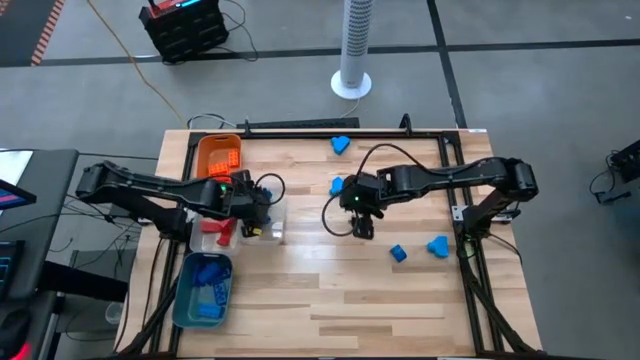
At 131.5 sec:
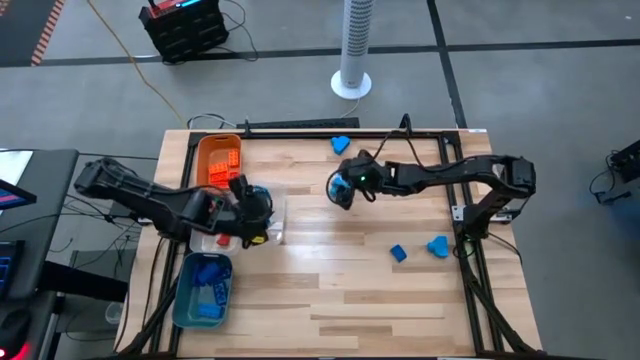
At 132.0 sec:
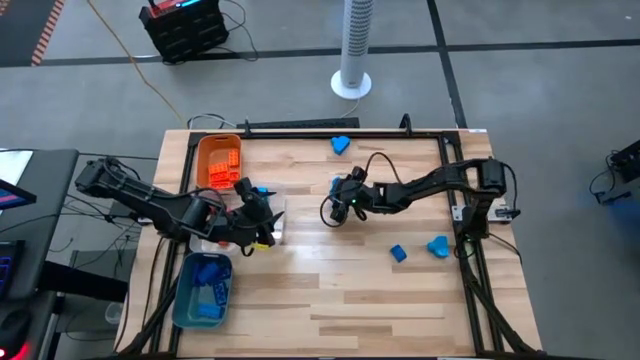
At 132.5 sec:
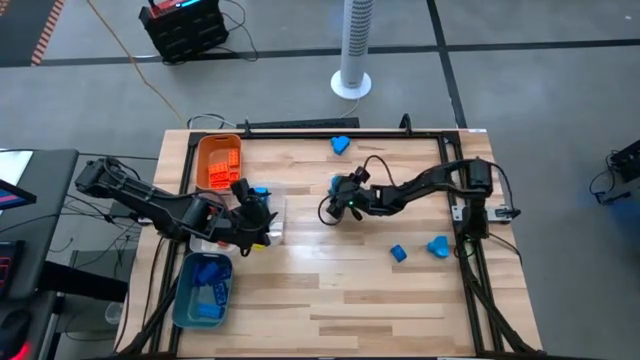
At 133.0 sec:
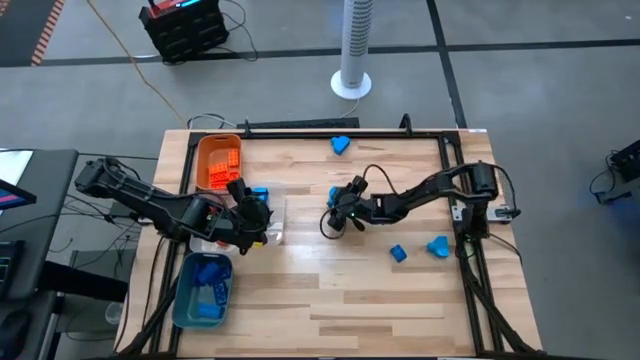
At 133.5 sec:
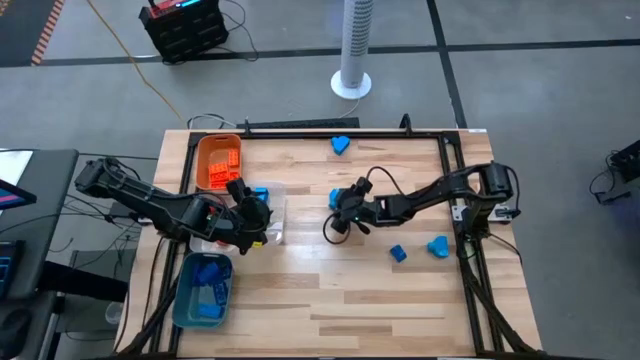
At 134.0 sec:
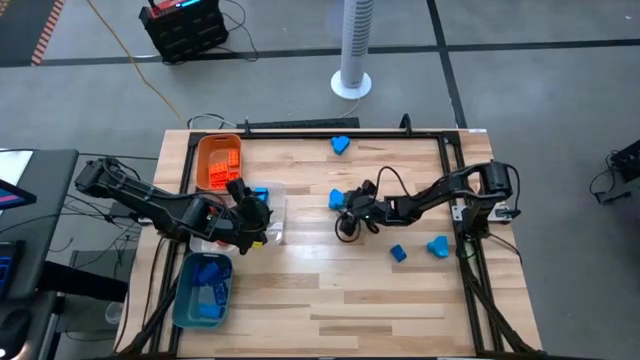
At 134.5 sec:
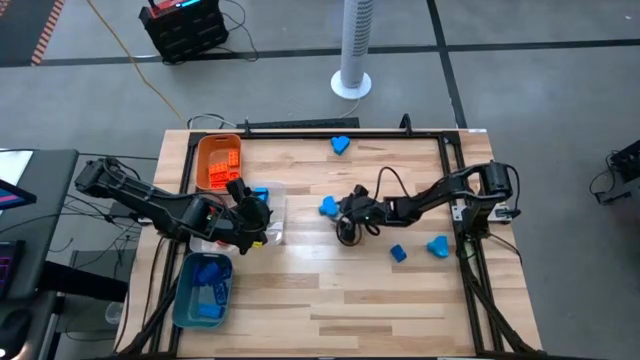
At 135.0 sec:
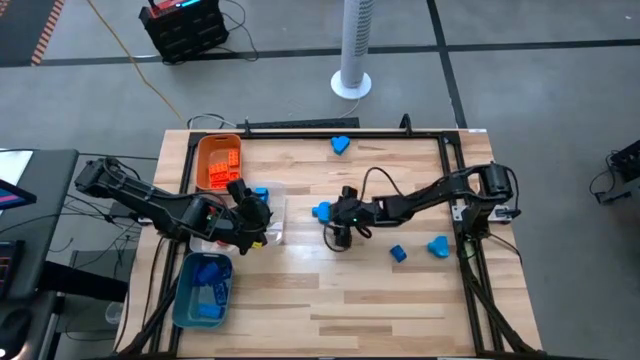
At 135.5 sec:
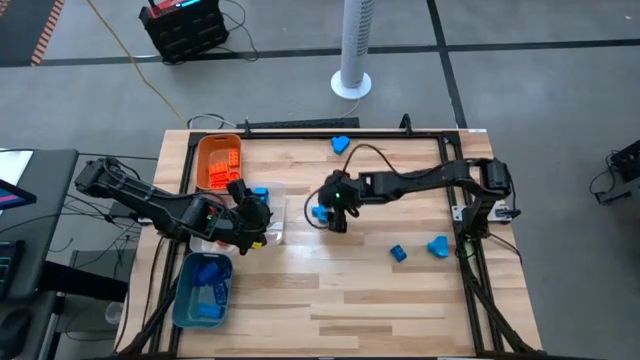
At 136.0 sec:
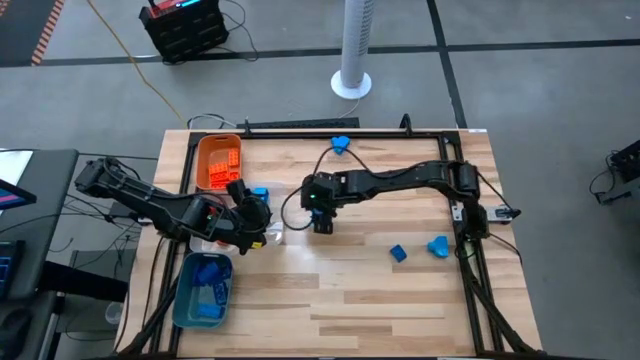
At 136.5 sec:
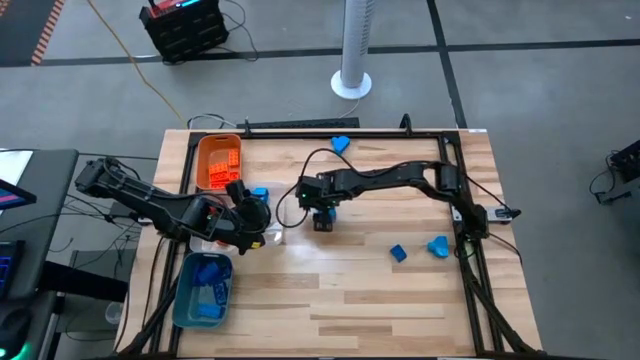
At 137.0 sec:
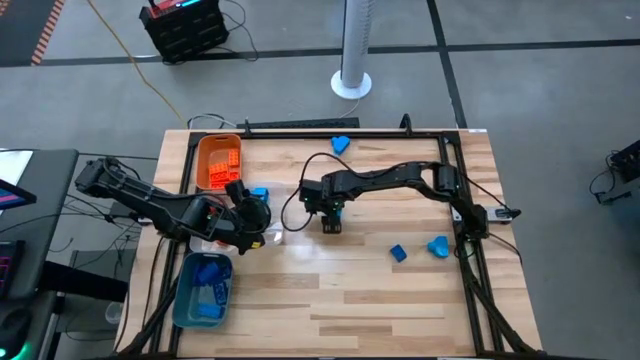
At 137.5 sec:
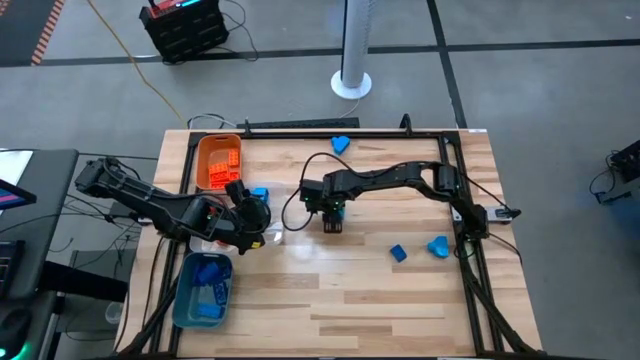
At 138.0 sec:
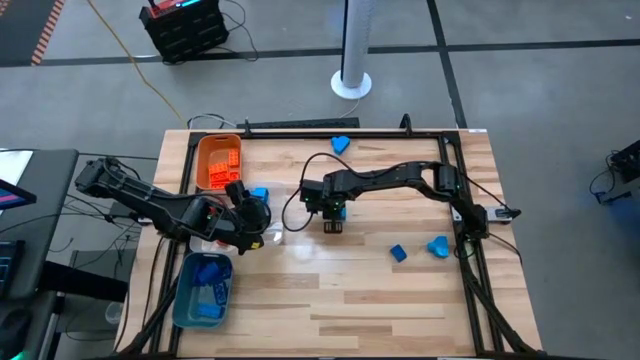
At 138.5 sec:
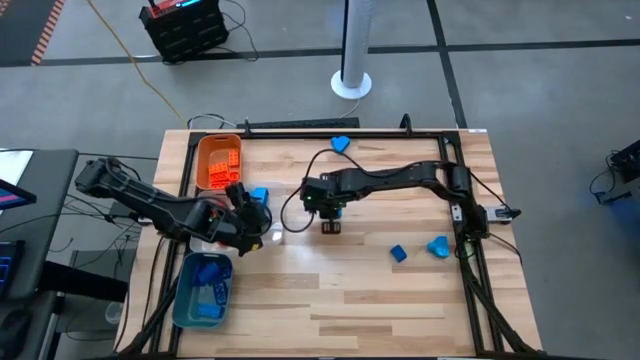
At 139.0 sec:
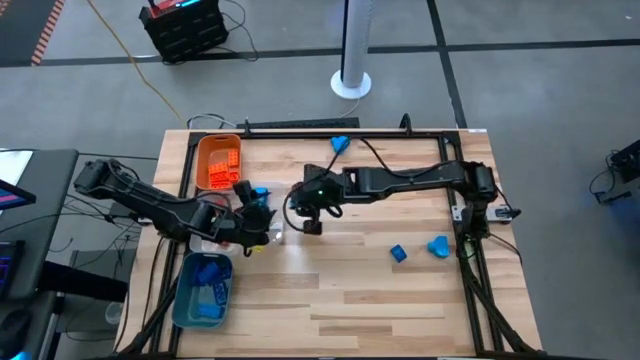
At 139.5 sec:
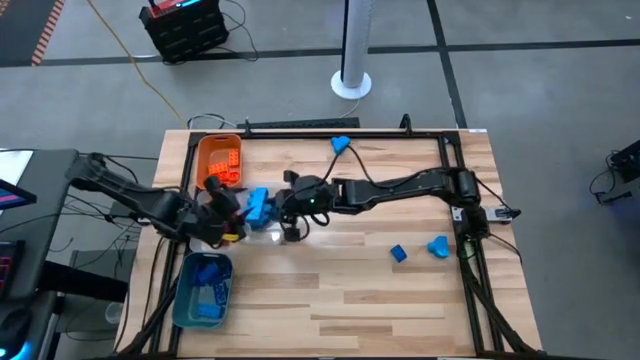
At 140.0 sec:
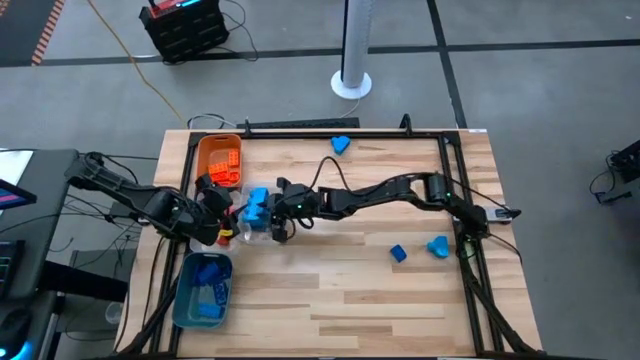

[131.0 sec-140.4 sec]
Task: Sort blocks
Put the light blue game piece into the right transparent bin

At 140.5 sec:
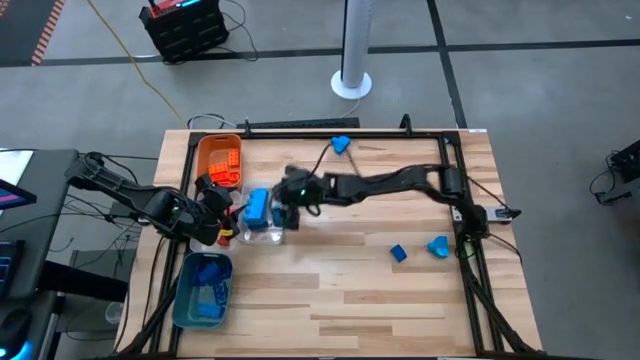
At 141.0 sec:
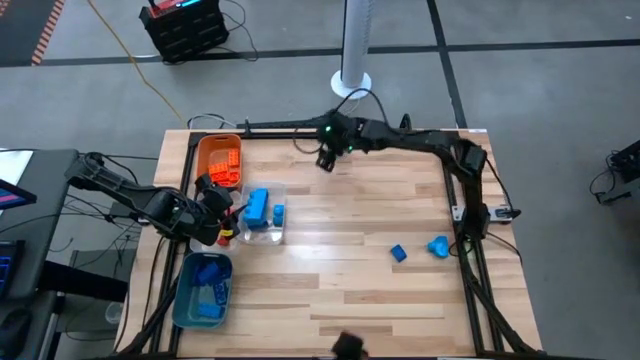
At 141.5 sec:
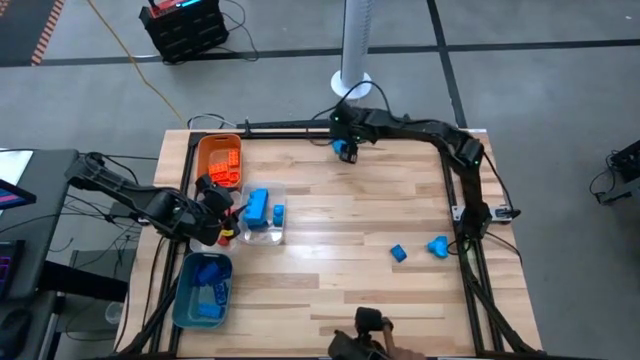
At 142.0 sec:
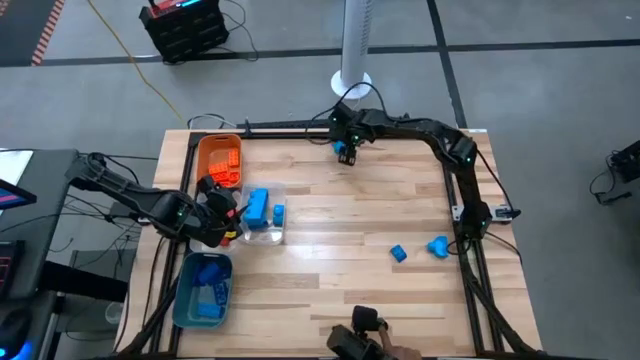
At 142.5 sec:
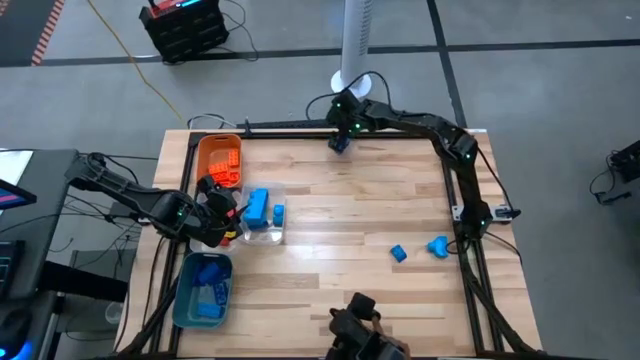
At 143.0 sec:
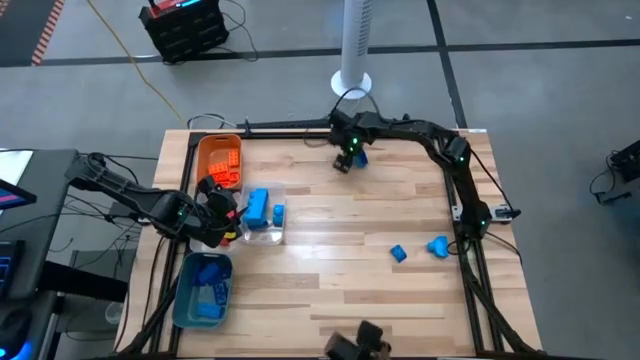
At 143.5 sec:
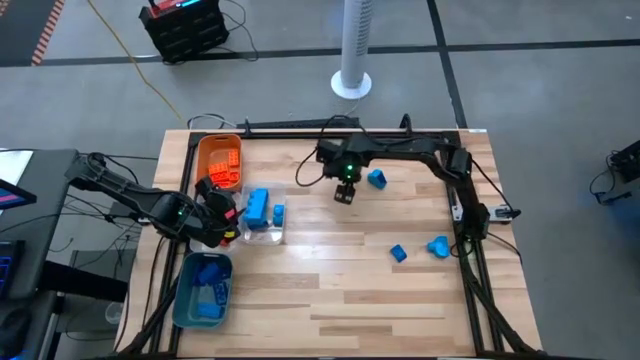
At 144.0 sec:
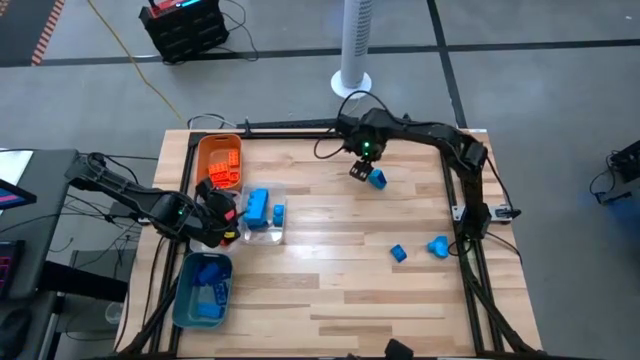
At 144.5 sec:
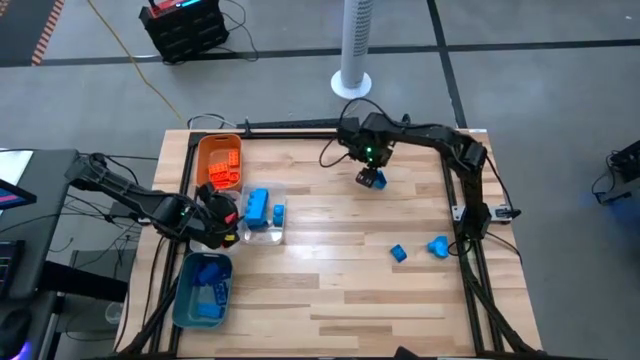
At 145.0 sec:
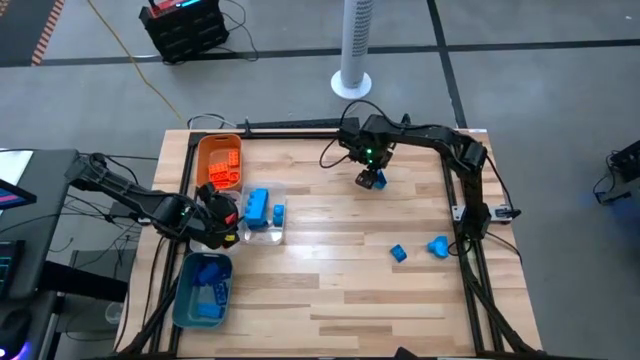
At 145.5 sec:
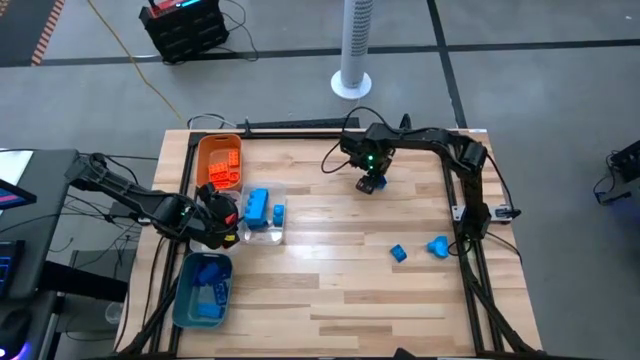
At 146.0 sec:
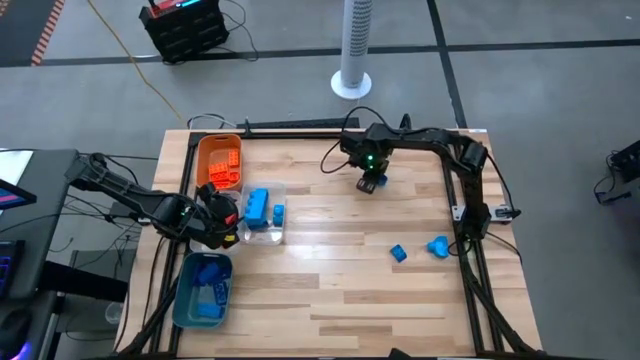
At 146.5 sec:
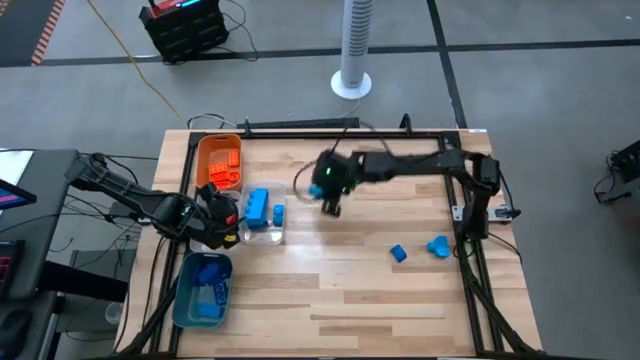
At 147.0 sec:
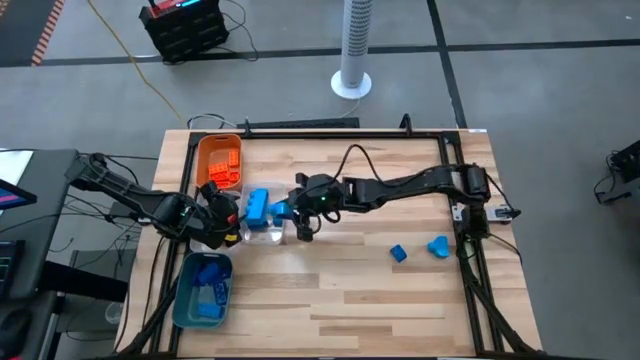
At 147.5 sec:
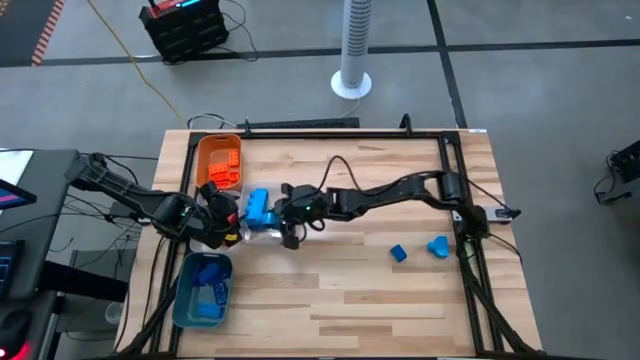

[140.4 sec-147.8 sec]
Put the light blue game piece into the right transparent bin

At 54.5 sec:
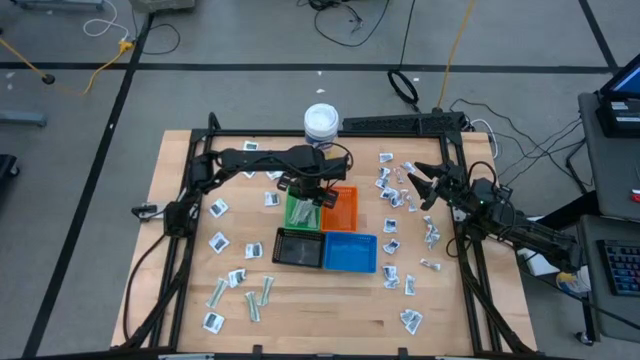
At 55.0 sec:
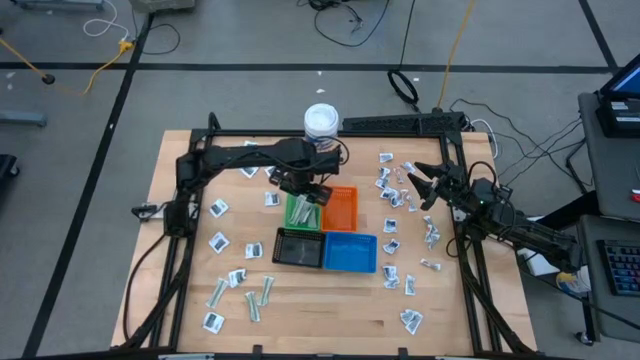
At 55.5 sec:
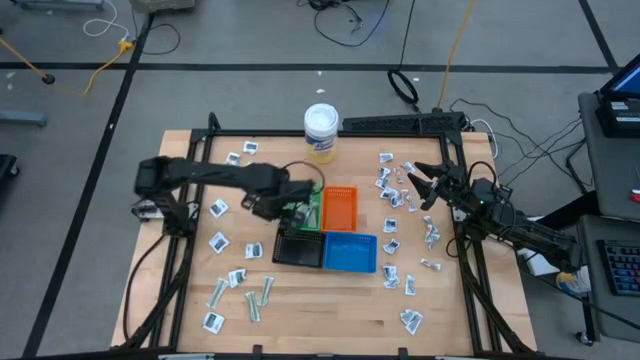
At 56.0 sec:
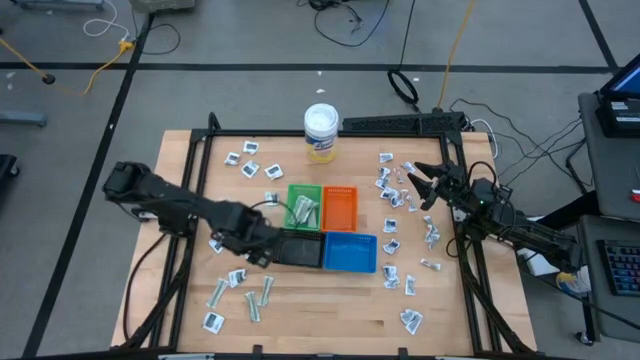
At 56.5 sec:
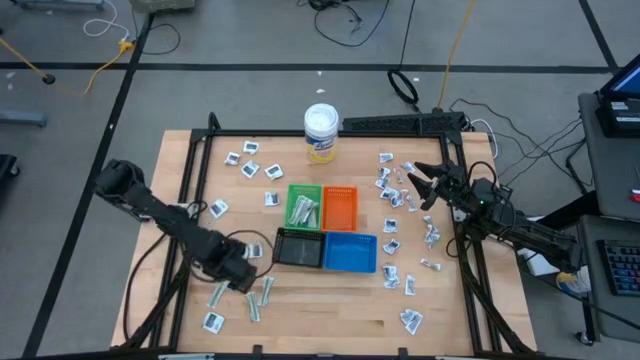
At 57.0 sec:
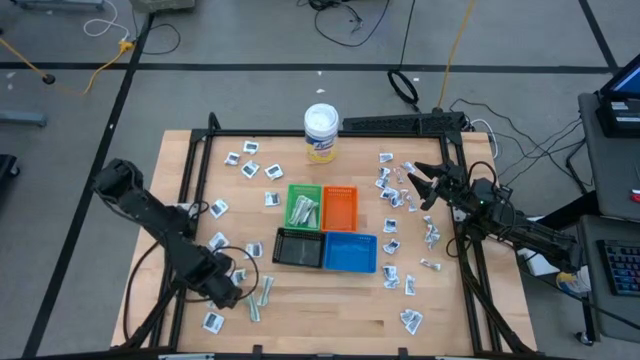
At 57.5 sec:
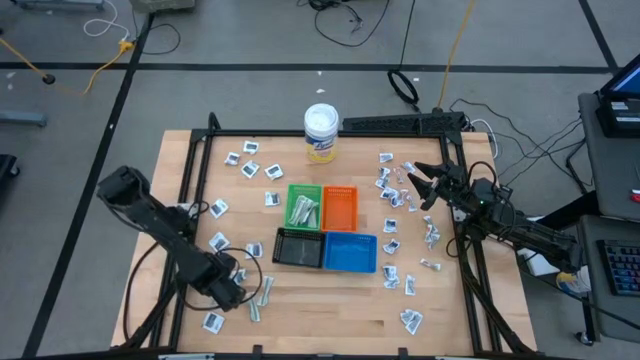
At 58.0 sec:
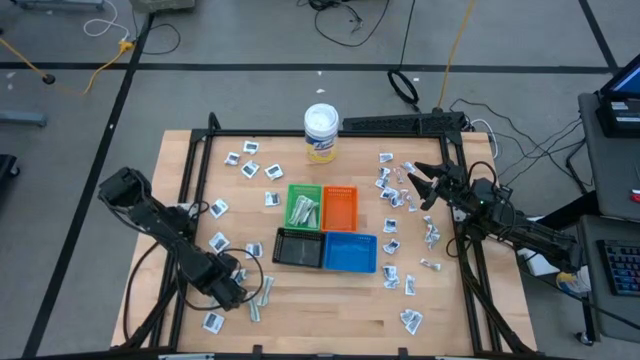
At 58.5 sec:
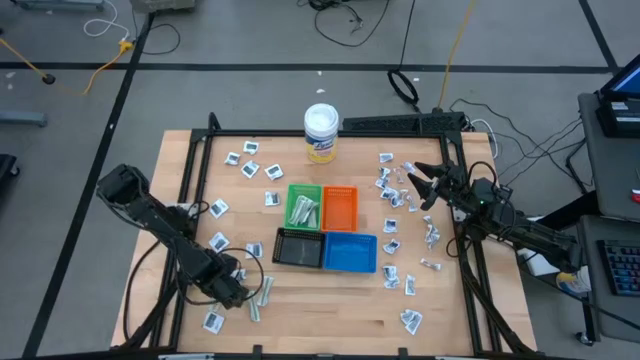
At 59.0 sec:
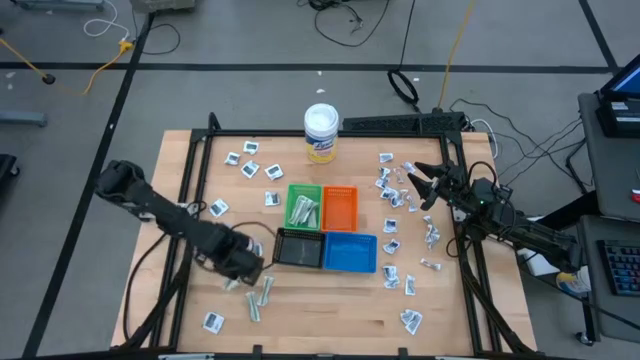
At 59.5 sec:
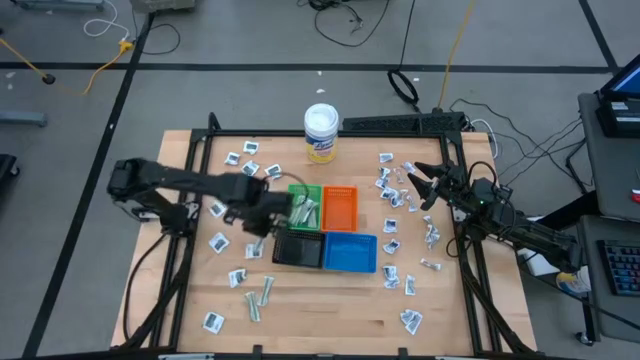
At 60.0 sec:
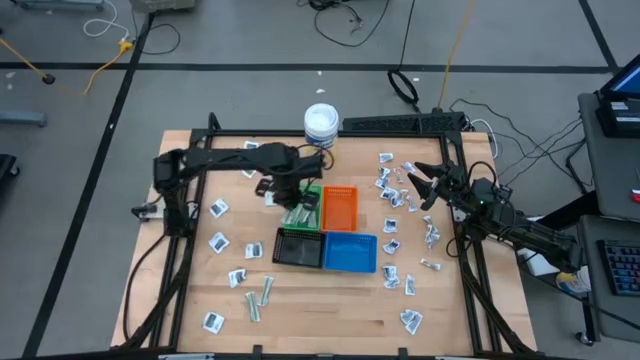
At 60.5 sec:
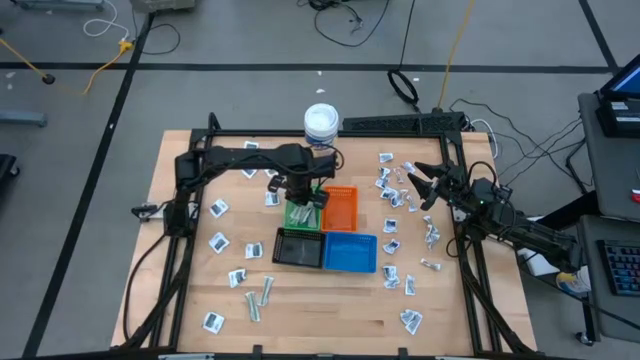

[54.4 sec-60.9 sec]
Task: Pick & Place First Aid Supplies
Put the bandage pack into the green bin
